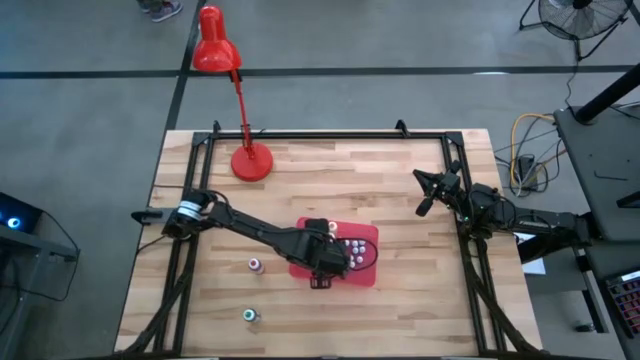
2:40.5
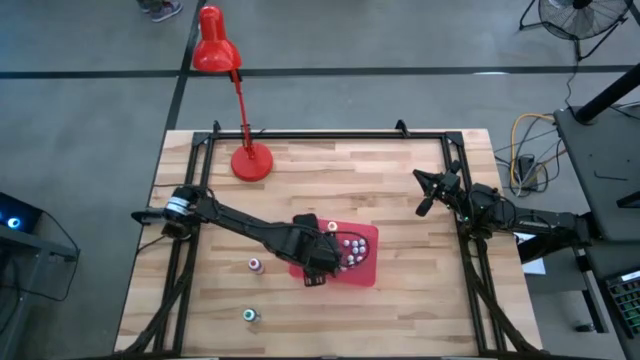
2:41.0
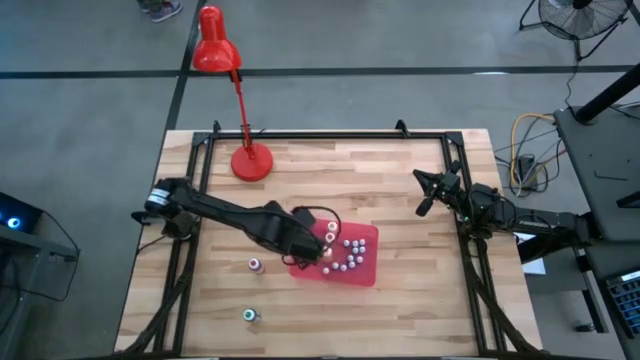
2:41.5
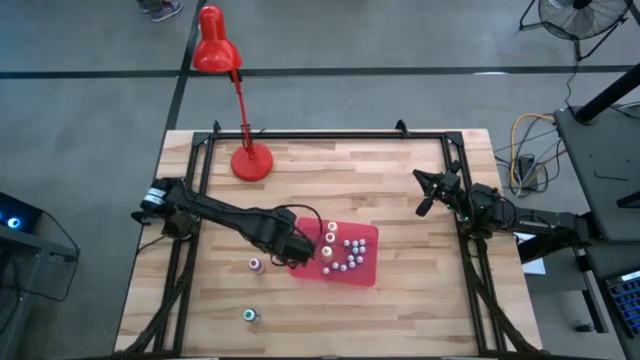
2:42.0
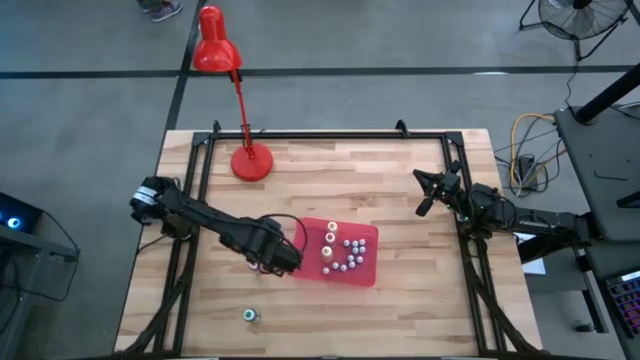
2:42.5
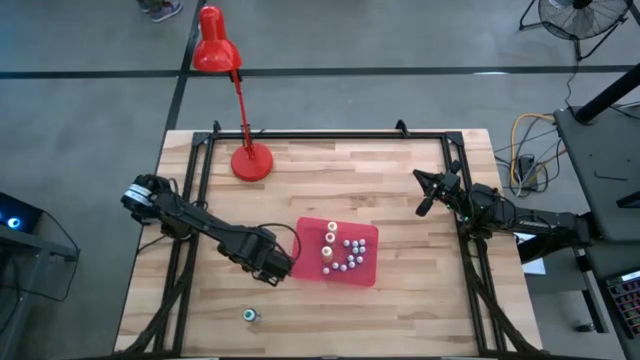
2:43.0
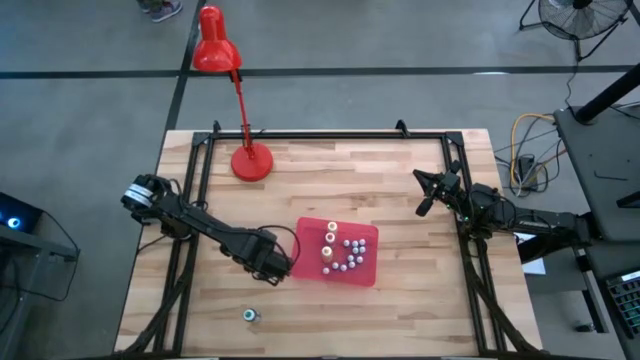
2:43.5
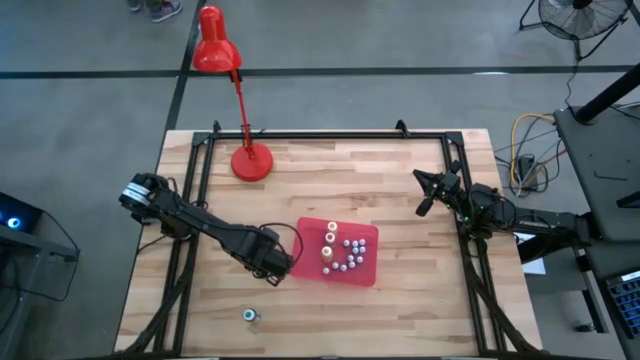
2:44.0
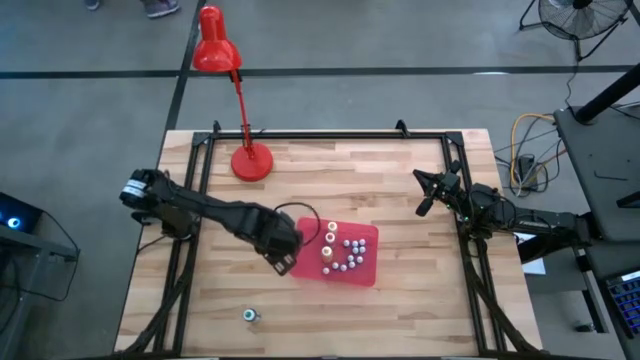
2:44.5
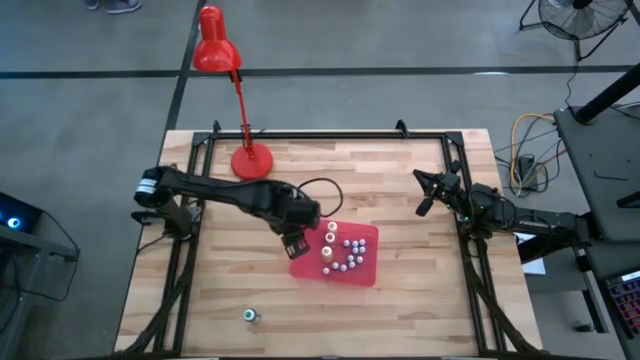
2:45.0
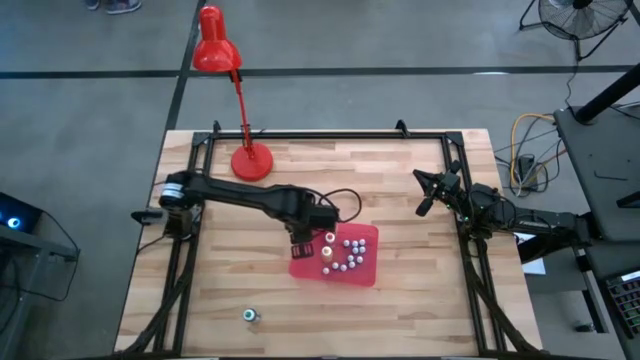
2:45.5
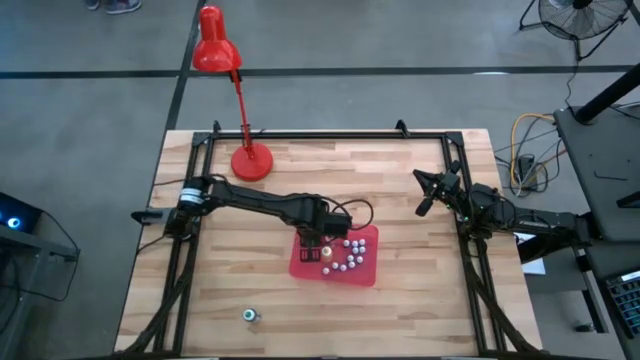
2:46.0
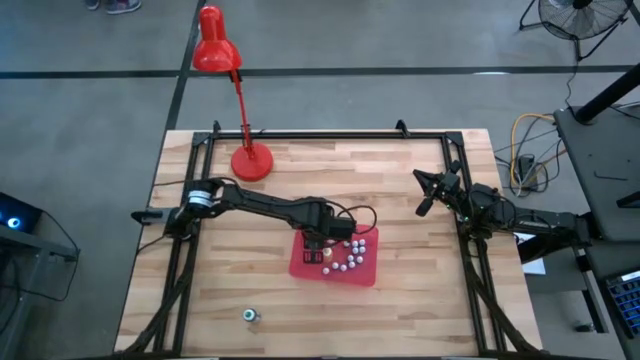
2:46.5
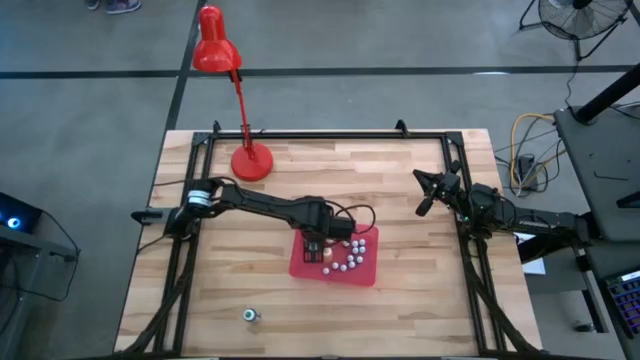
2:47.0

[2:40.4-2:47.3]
Task: Pick & Place food coloring
Put the large red food coloring bottle in the red bin

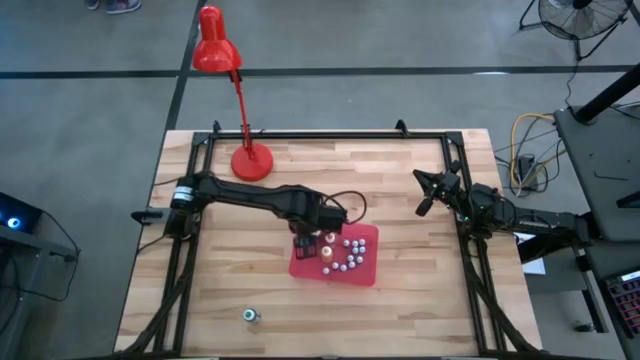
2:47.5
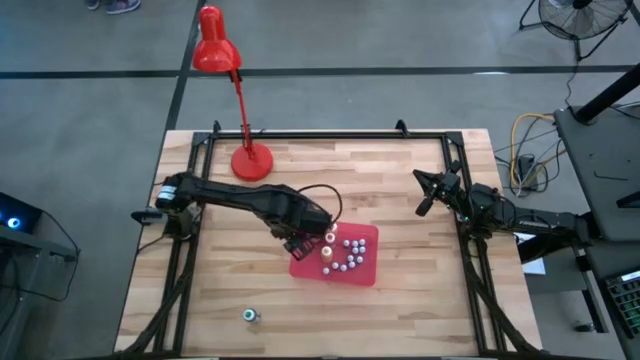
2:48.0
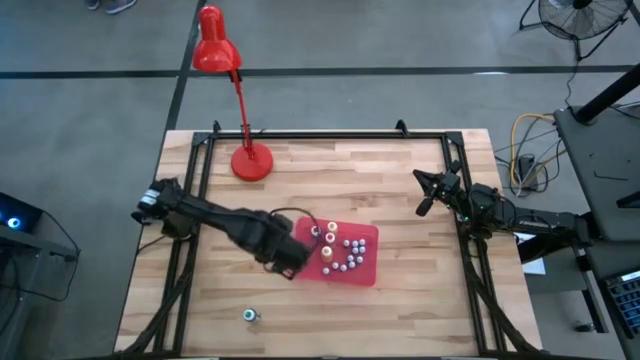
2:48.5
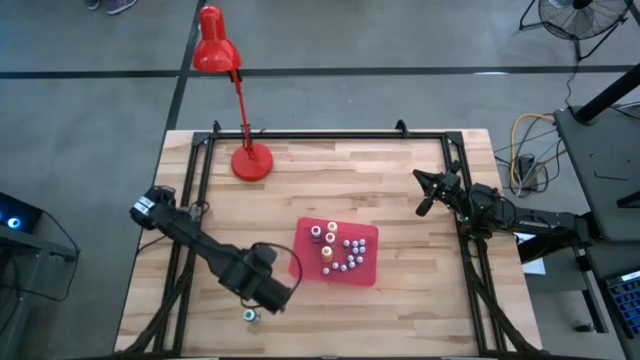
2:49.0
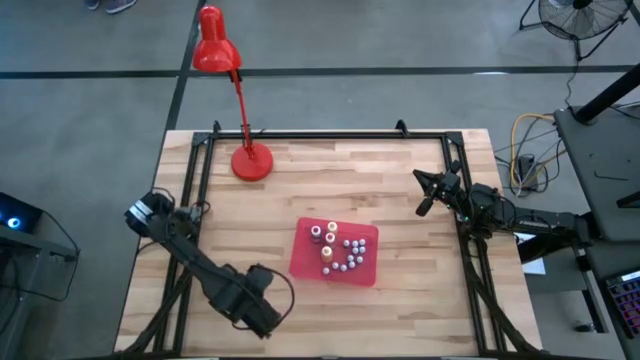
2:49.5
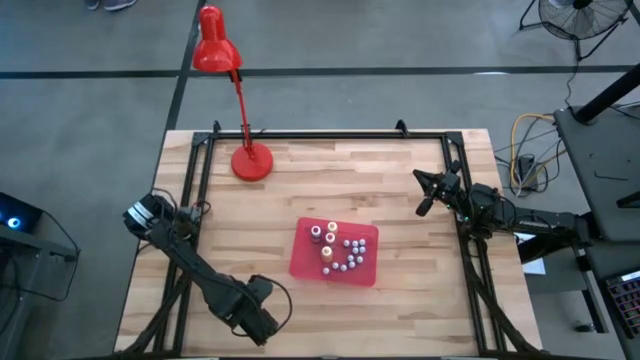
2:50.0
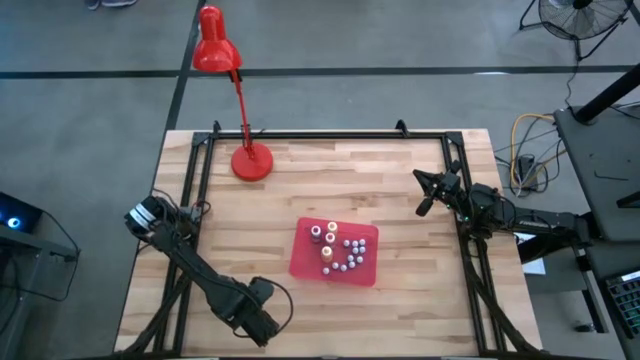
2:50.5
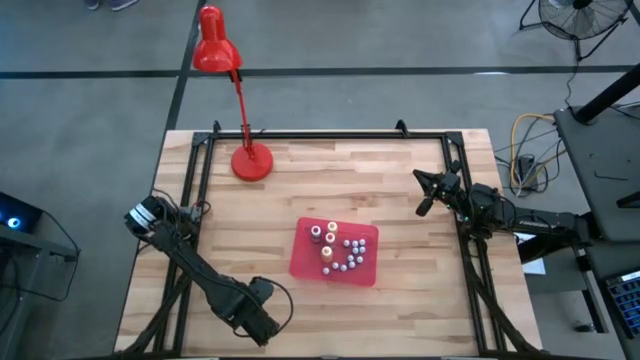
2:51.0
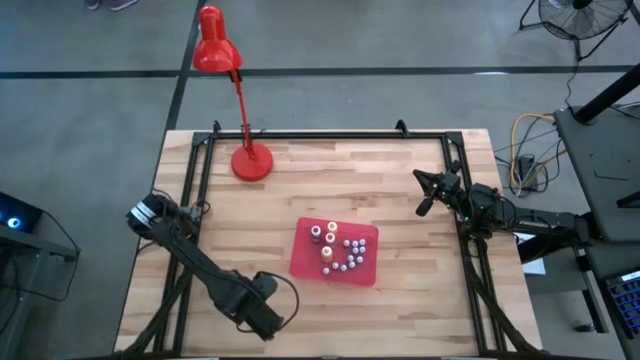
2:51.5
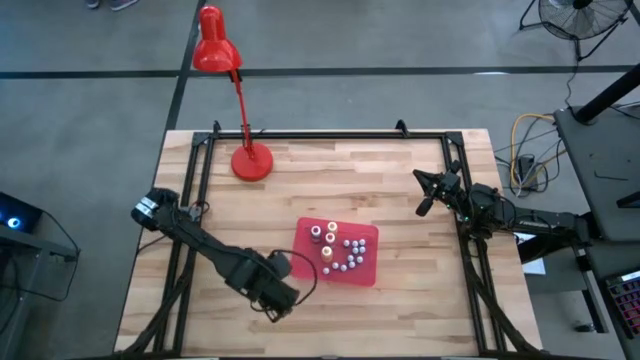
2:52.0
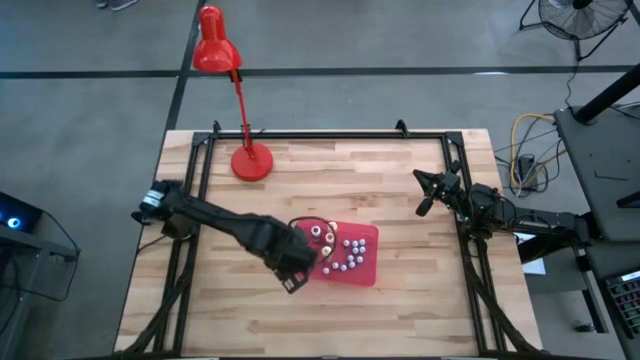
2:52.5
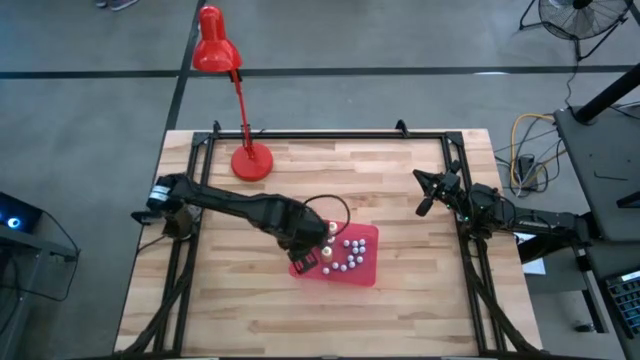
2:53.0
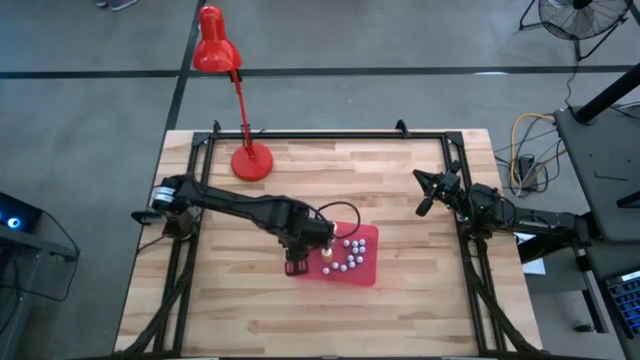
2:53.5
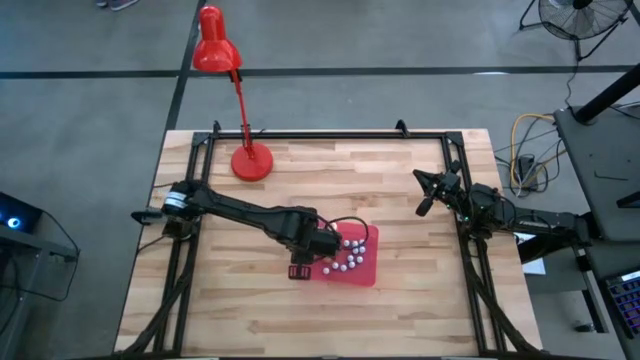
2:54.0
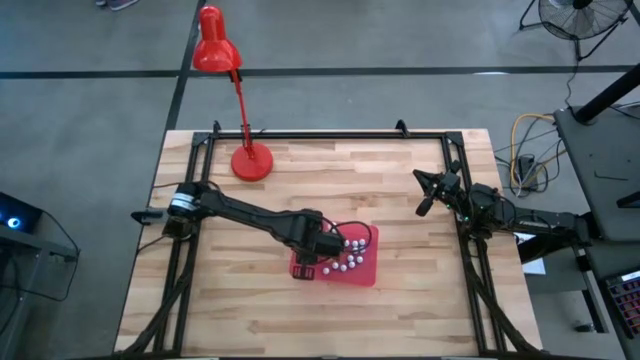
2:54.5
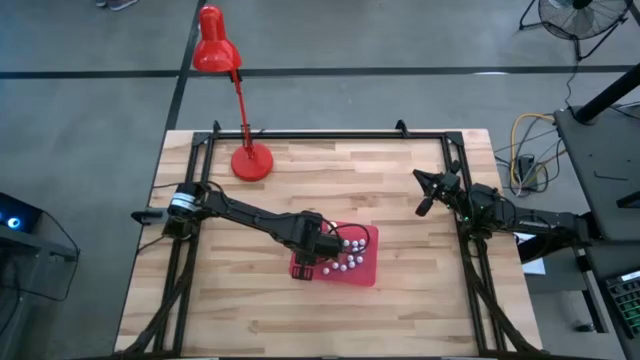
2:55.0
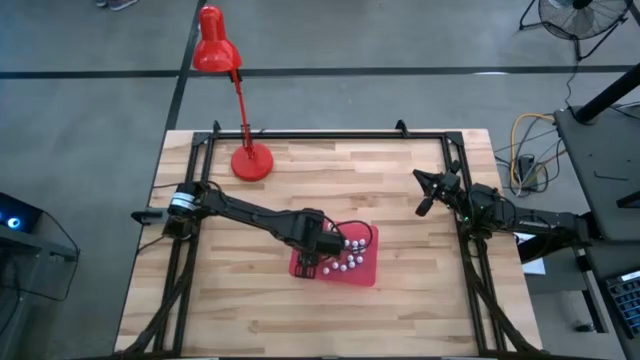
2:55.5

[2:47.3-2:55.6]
Put the large green food coloring bottle in the red bin

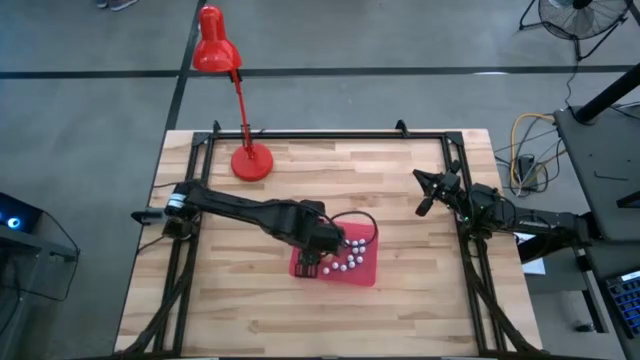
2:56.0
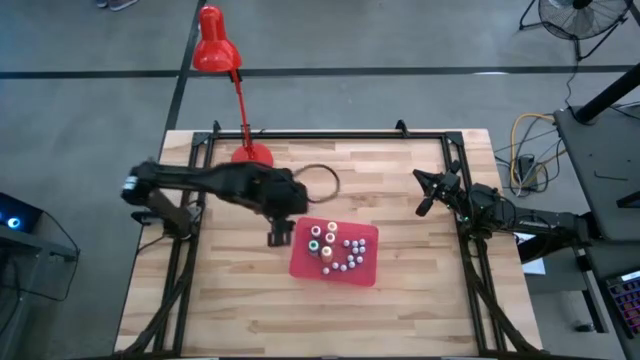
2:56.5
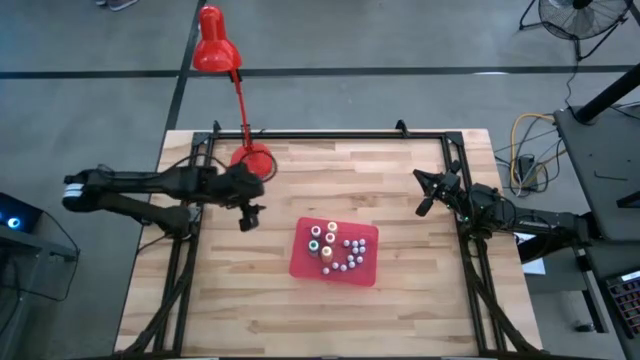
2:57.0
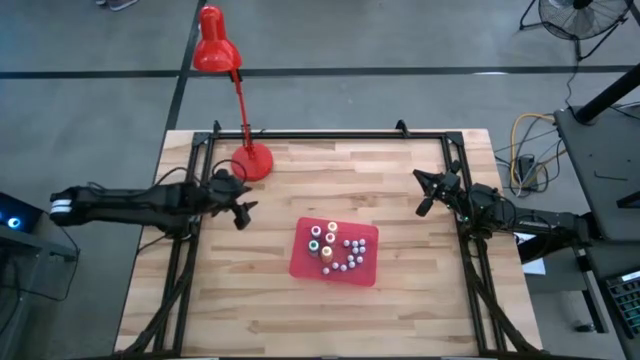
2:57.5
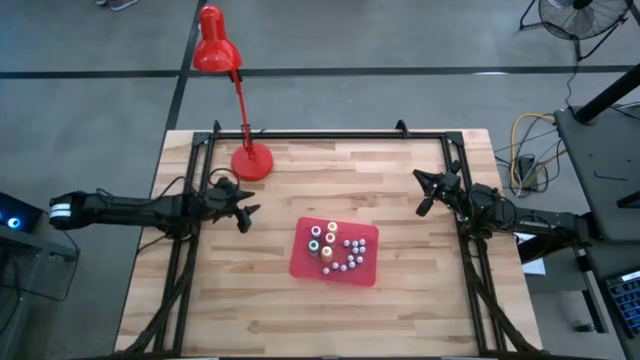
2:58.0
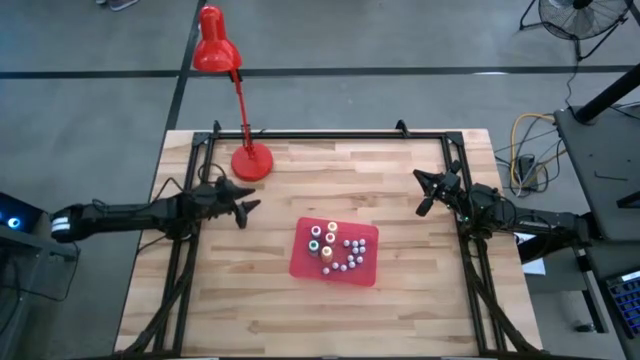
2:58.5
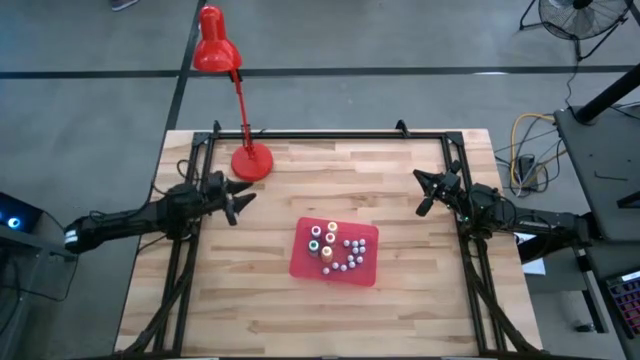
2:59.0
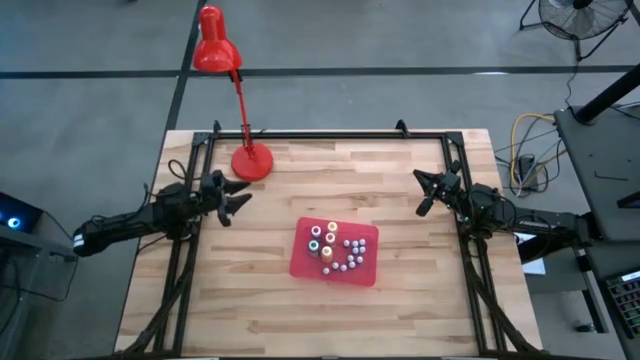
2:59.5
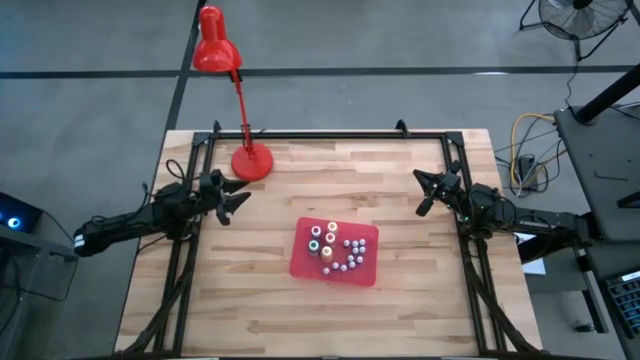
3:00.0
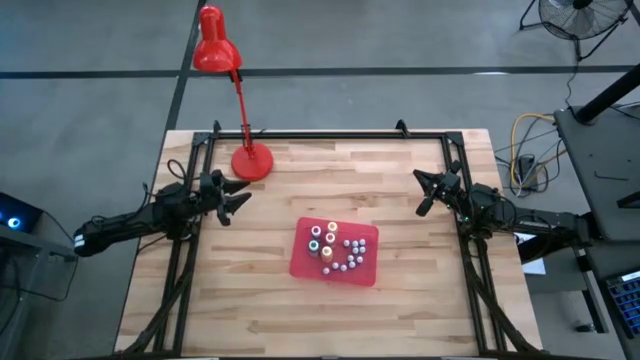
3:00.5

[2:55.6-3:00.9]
Return to Home Position

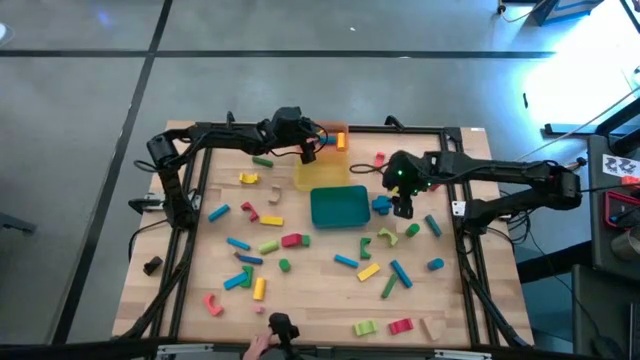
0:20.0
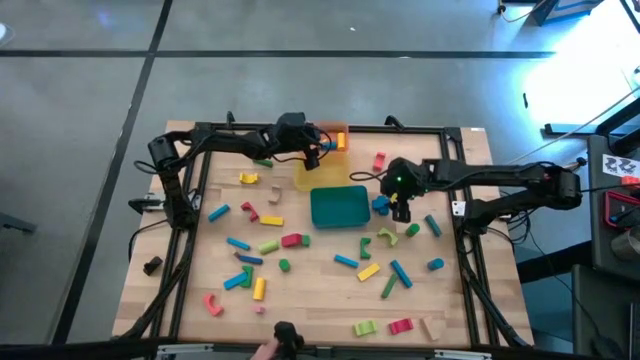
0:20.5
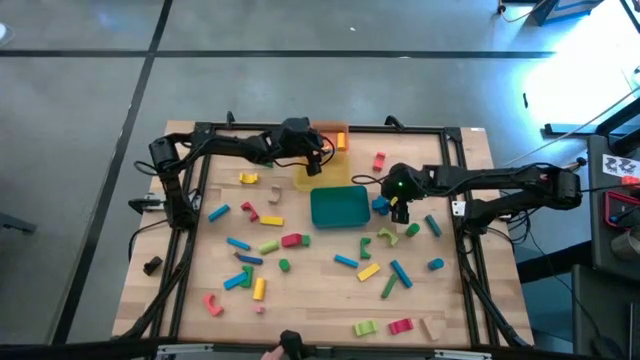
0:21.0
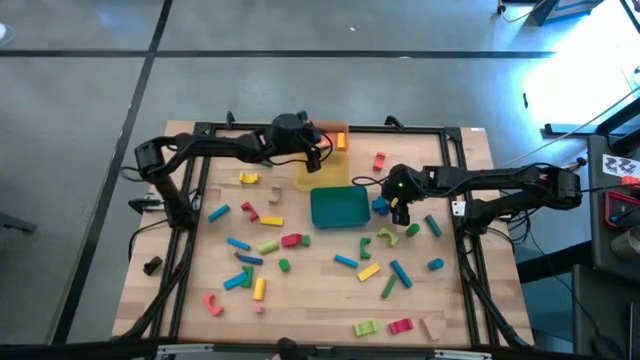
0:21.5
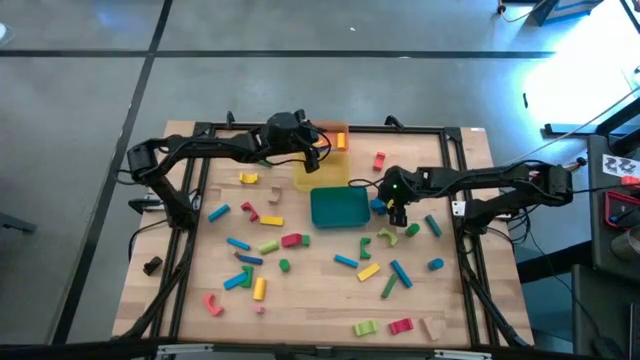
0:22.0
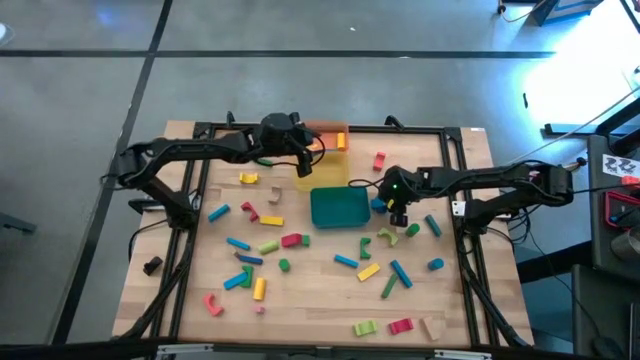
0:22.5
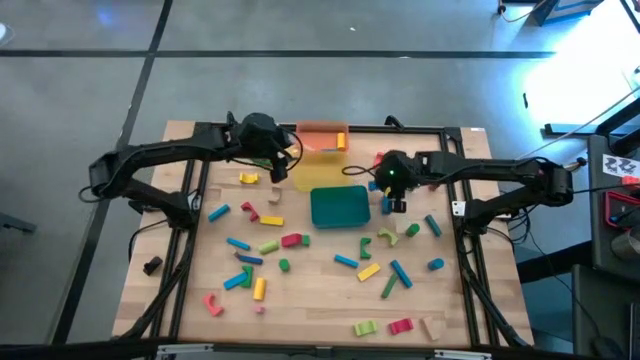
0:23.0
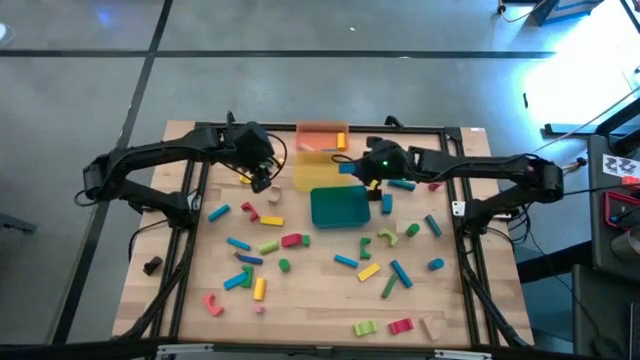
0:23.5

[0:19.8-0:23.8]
Task: Sort blocks by size
Put the blue arch block into the yellow bin
